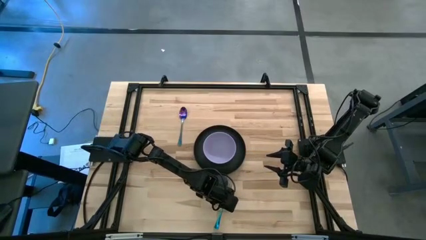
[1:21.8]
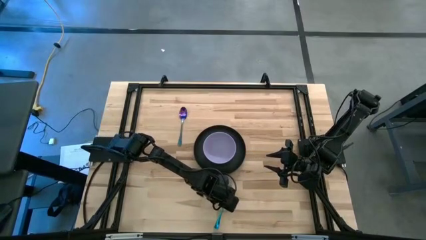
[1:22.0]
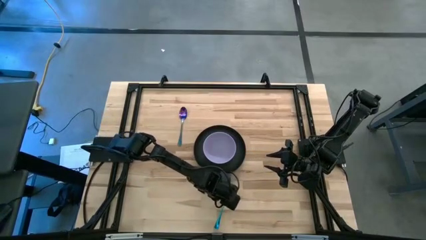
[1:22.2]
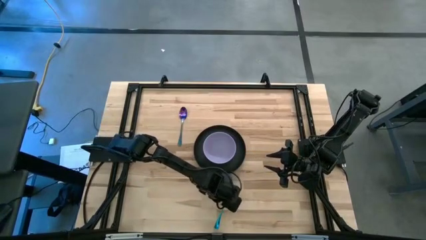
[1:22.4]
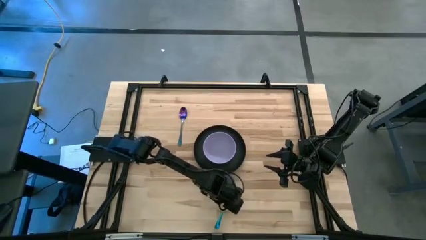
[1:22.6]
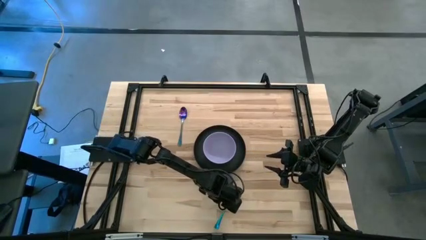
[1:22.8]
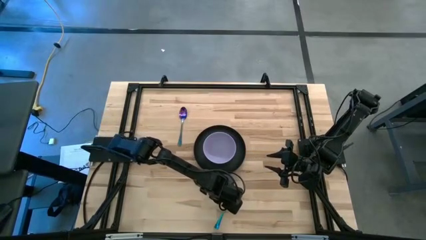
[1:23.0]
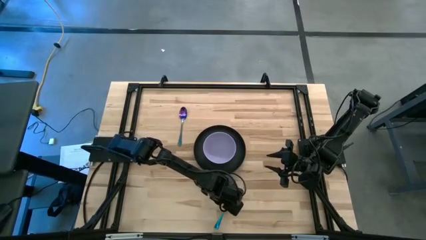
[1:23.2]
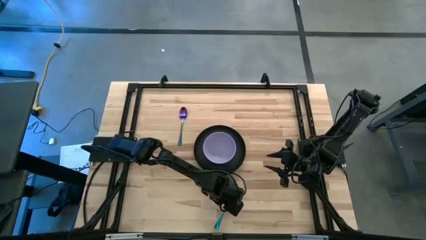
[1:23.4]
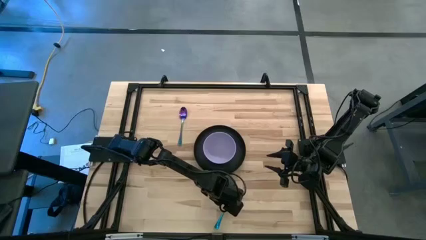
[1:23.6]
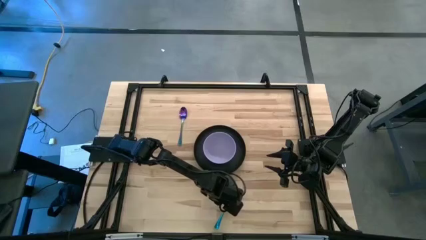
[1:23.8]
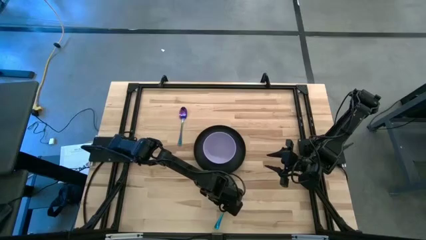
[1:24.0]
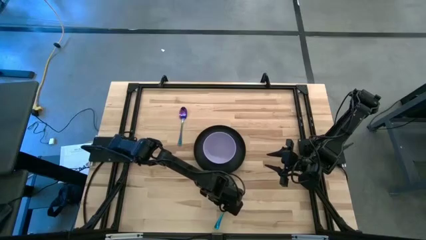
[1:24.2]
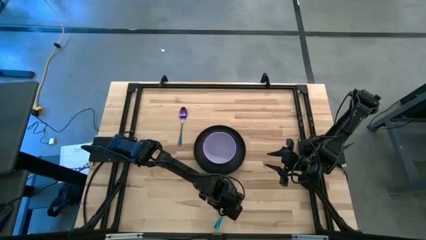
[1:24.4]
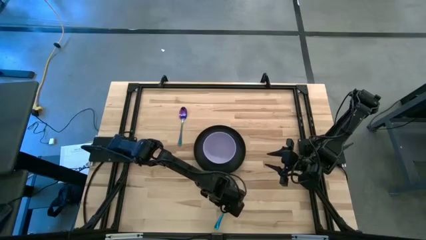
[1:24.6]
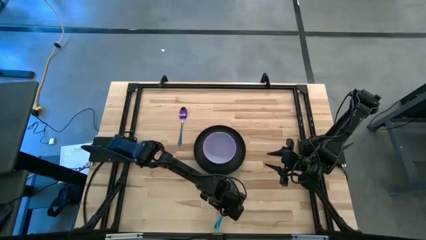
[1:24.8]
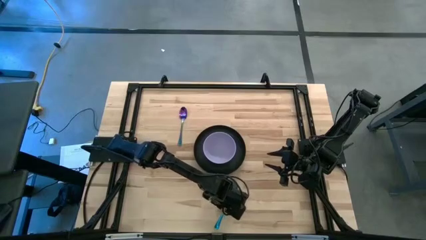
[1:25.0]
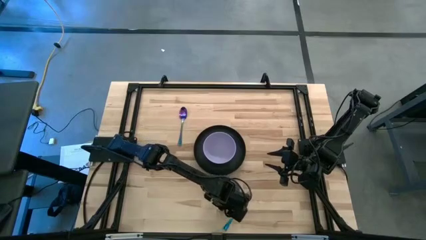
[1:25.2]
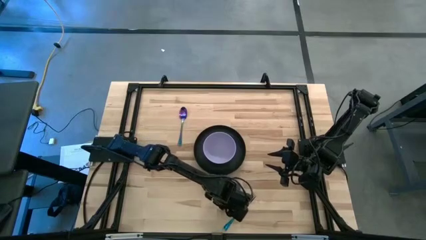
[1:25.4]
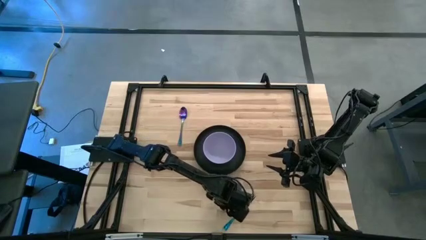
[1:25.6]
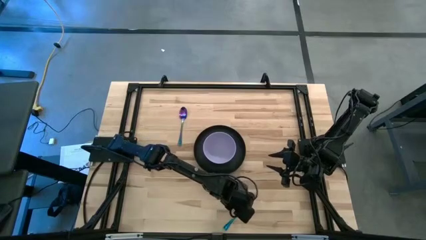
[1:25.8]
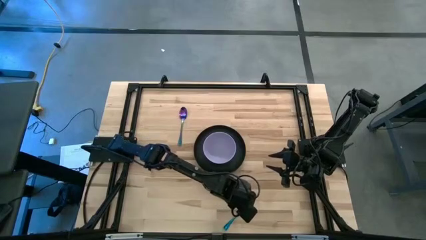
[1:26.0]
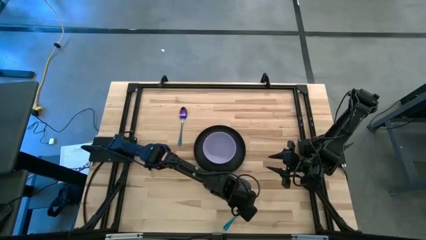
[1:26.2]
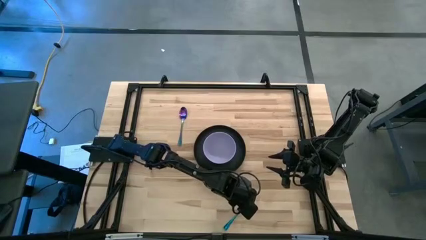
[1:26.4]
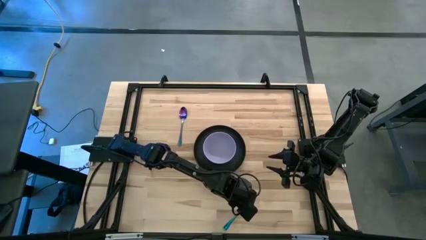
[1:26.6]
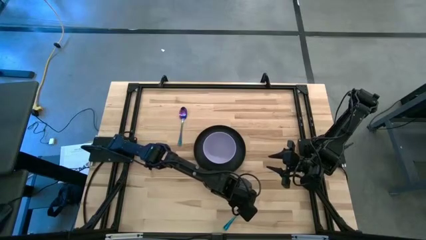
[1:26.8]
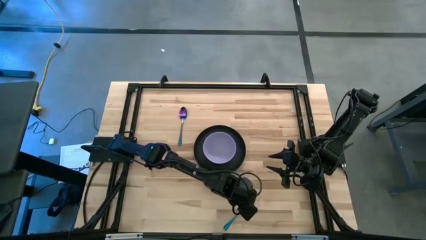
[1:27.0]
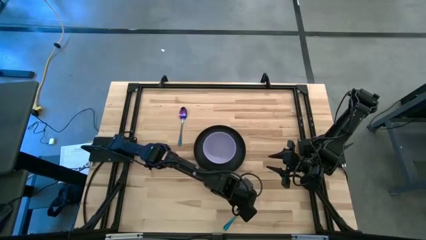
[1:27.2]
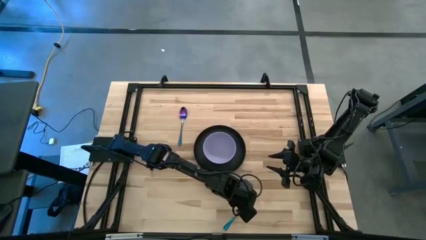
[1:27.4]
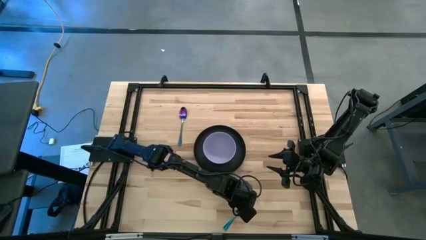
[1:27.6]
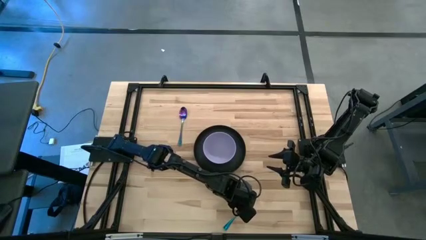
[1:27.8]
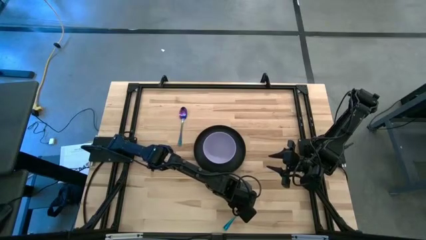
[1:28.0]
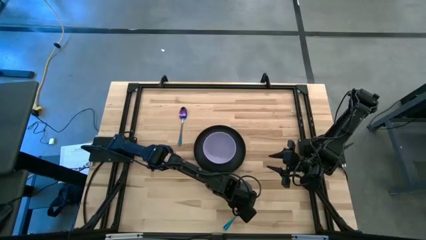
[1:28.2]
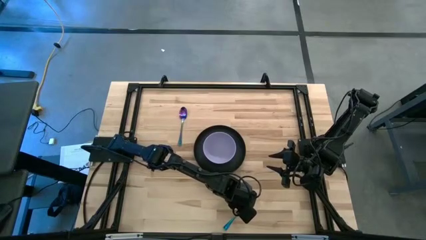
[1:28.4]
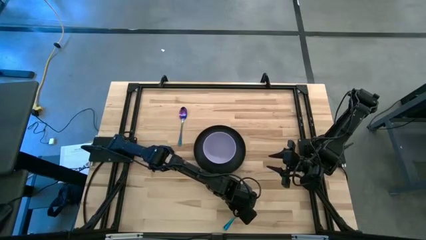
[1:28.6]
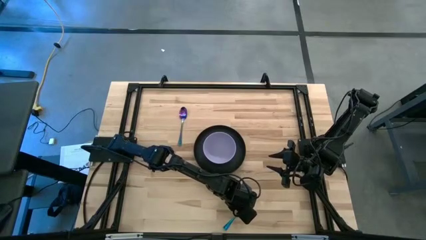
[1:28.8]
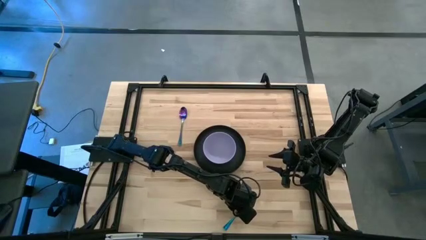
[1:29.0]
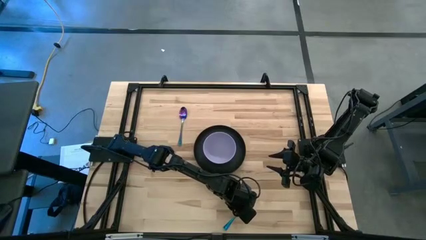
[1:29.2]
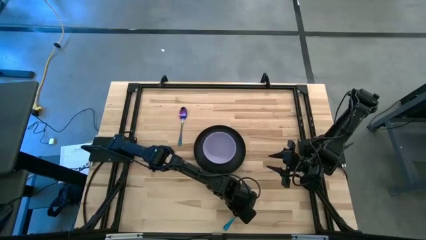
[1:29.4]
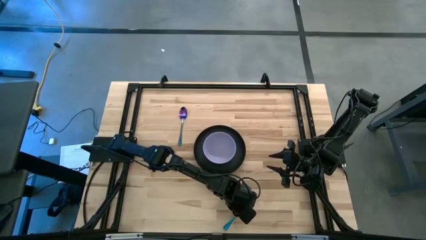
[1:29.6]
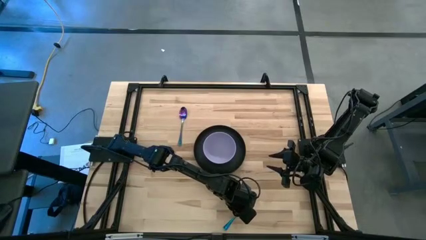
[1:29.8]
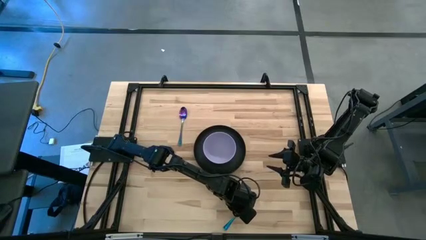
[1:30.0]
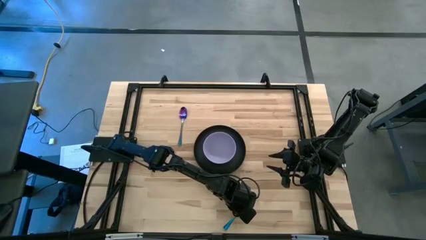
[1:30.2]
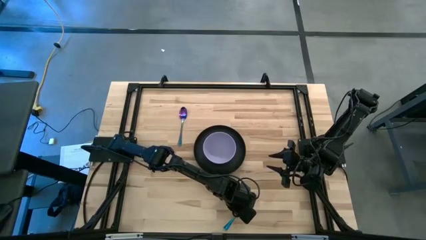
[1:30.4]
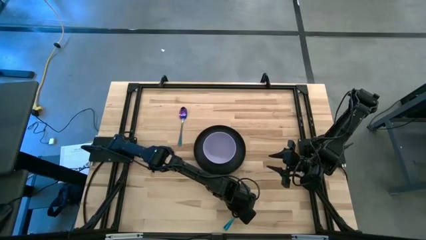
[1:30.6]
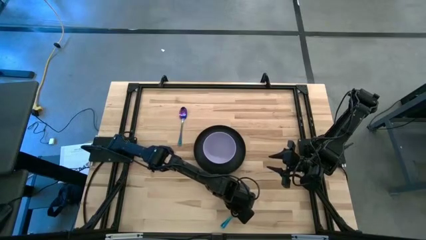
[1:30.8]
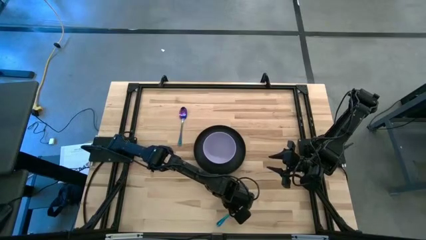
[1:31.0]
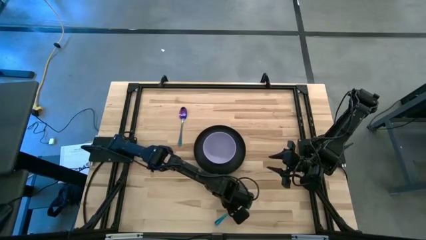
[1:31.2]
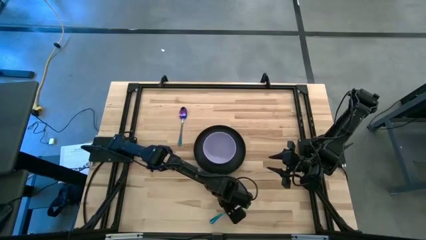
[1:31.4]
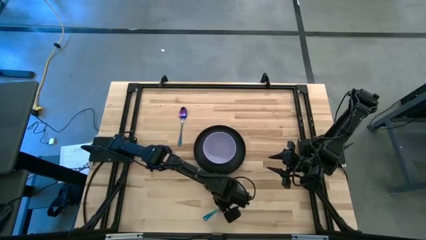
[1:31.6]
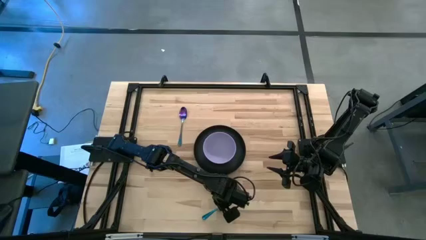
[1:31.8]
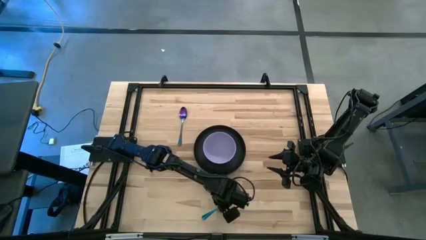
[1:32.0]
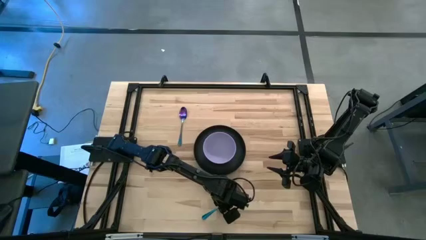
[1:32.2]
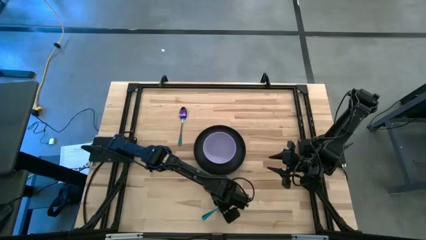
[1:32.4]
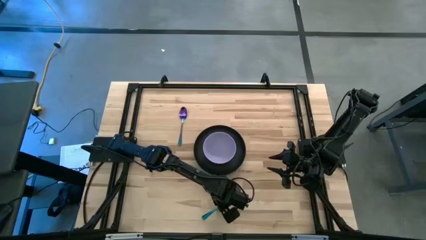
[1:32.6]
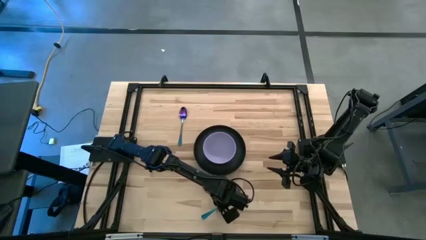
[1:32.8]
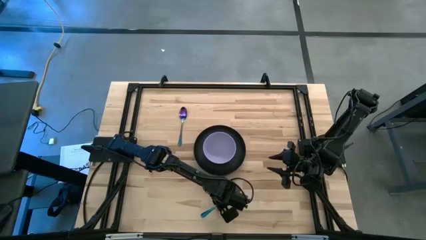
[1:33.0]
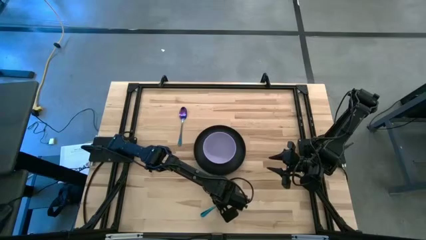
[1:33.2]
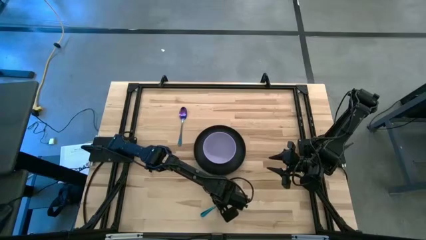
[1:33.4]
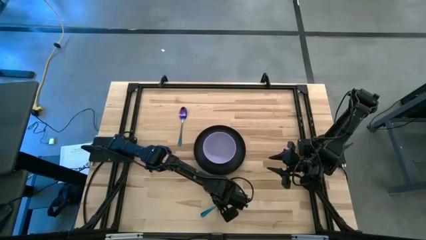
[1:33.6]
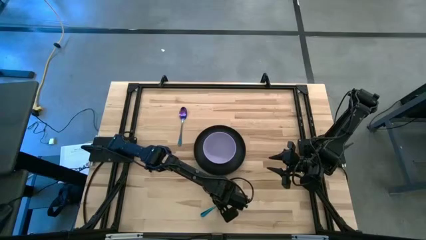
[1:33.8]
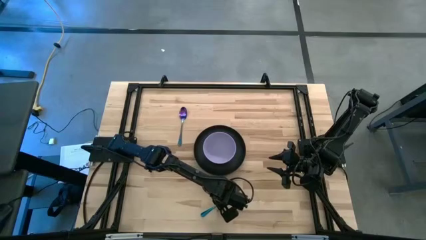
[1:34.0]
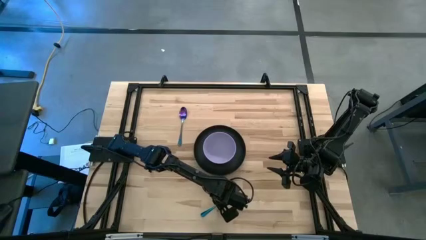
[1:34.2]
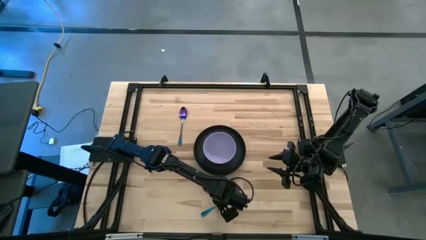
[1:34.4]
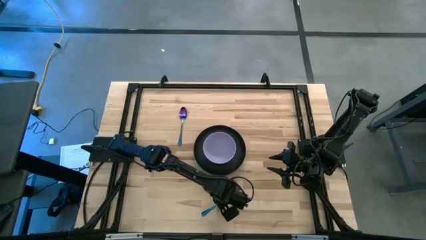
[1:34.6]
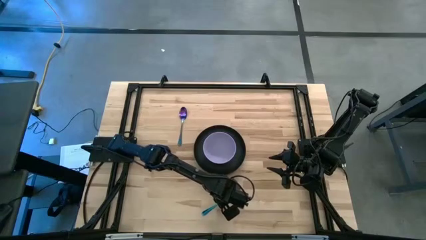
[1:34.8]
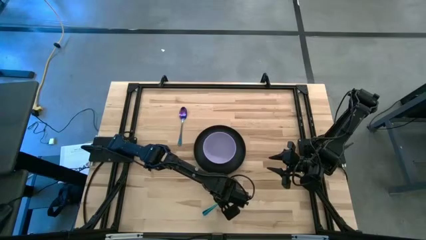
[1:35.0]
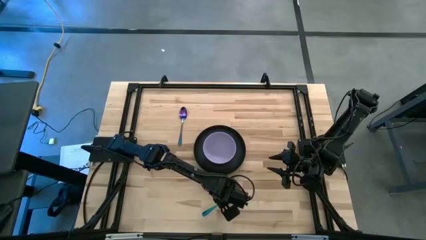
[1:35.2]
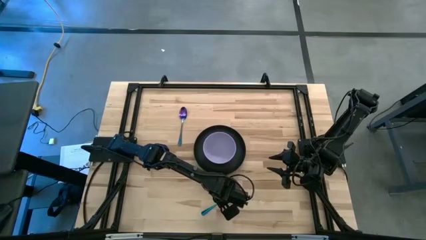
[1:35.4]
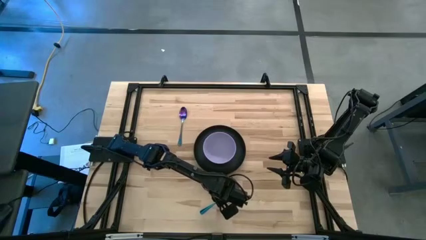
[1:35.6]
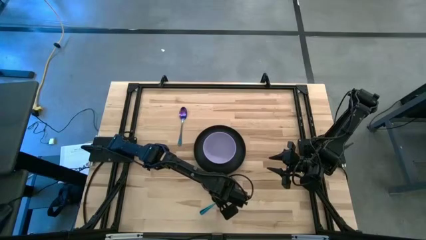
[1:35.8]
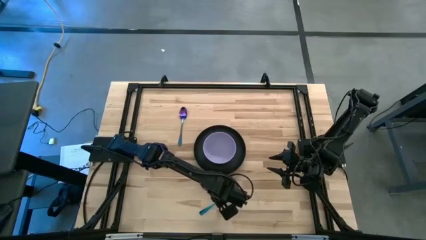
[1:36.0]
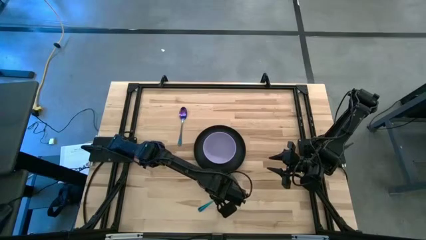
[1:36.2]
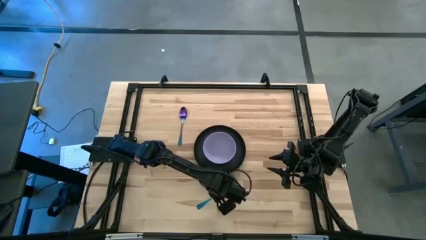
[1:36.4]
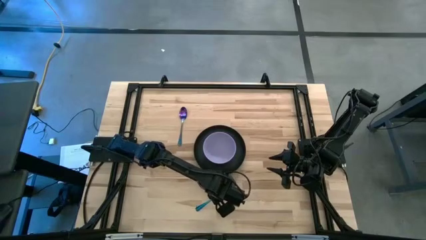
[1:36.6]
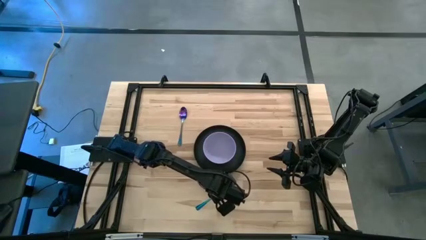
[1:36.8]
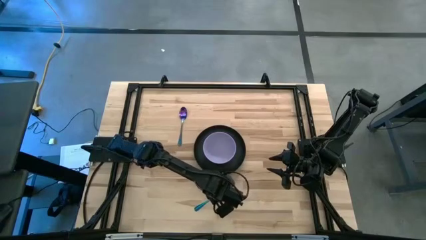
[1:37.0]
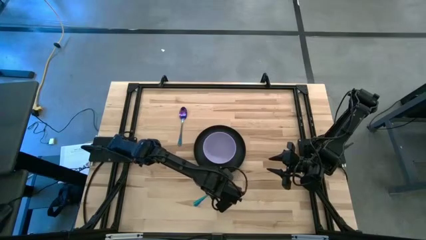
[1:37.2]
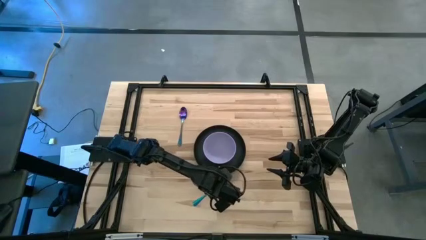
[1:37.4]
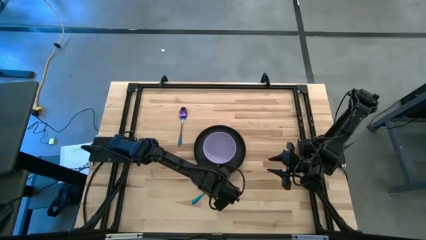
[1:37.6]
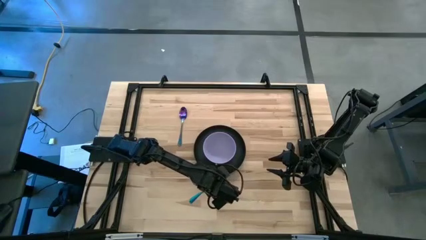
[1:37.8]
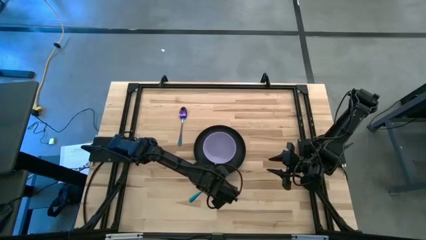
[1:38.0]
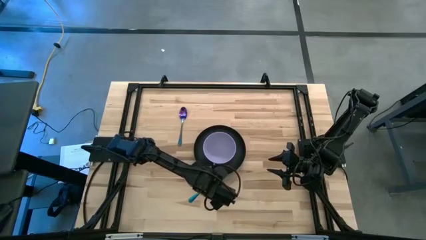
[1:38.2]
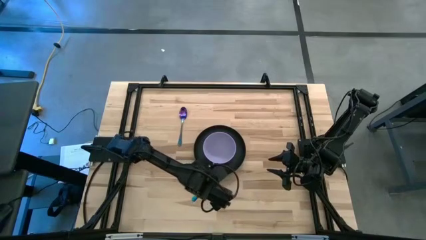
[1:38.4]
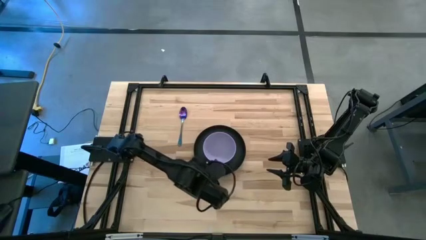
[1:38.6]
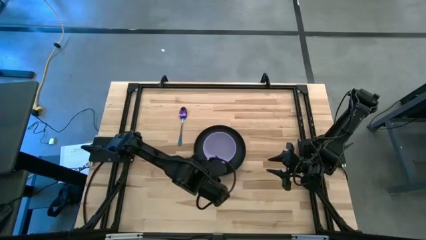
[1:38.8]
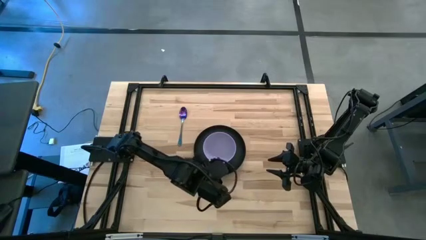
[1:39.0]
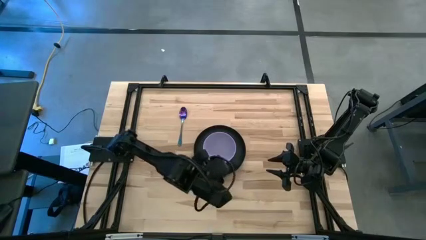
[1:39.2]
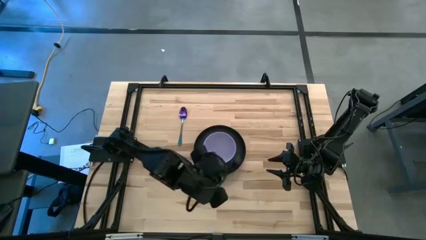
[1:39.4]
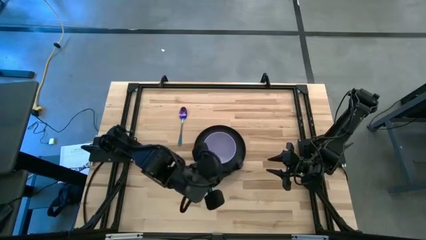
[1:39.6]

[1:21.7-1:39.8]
Task: Set table place
Move the fork to the left side of the black plate
